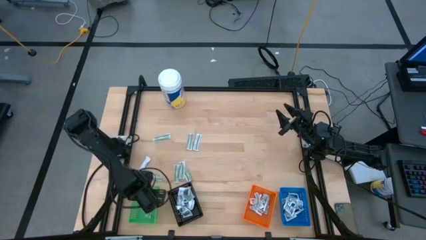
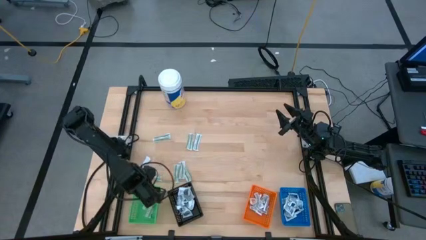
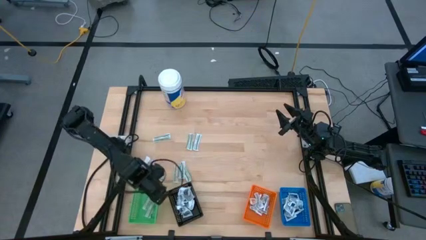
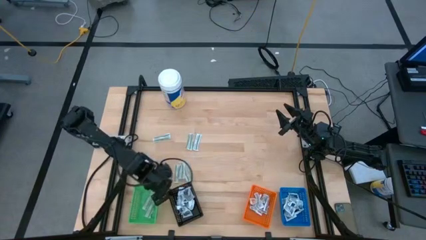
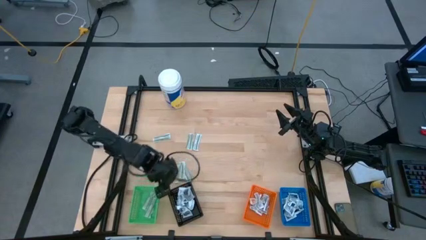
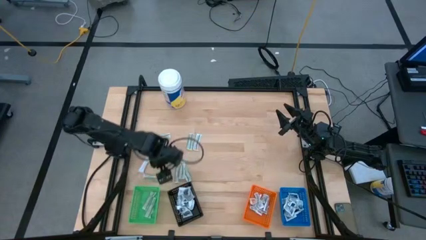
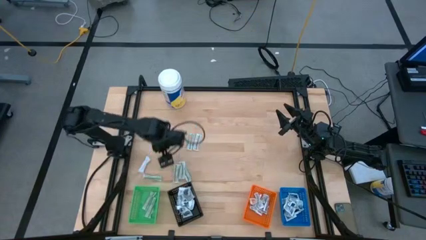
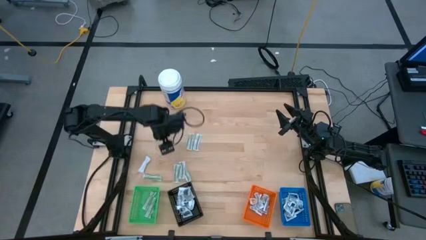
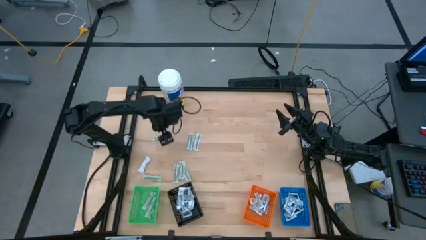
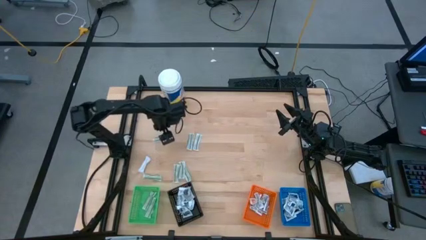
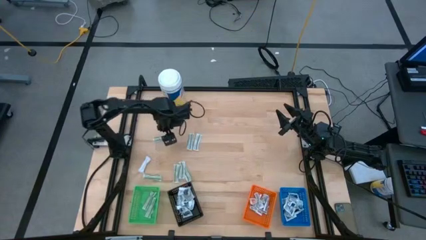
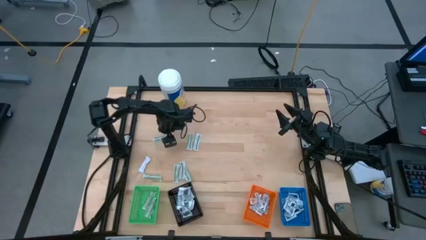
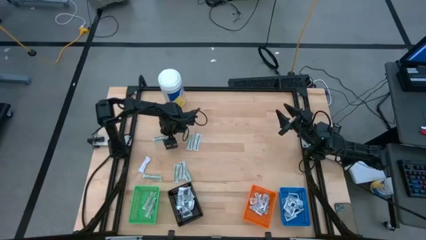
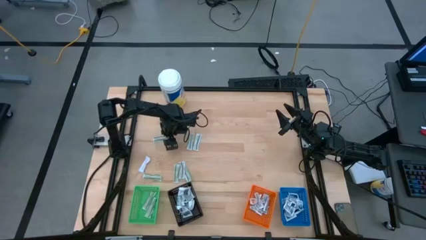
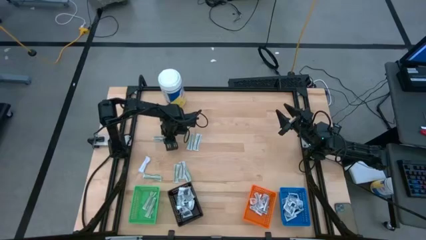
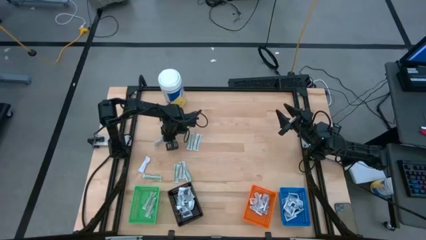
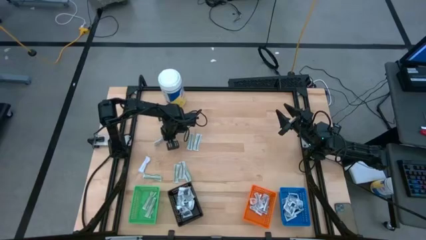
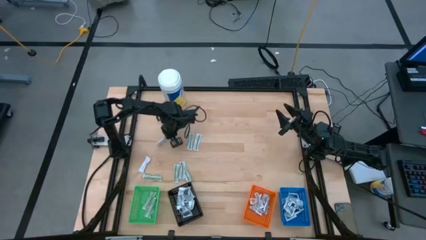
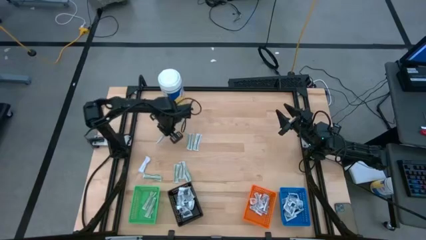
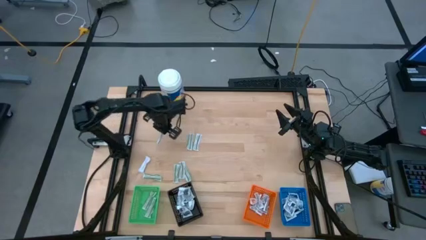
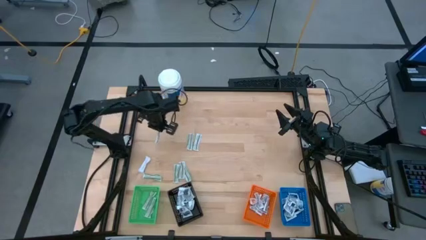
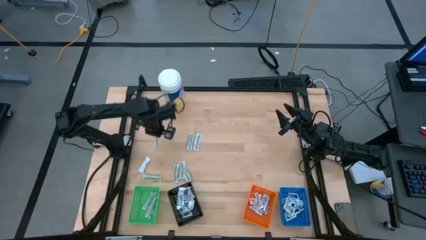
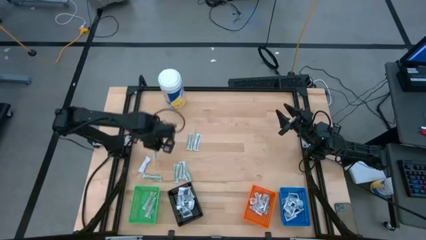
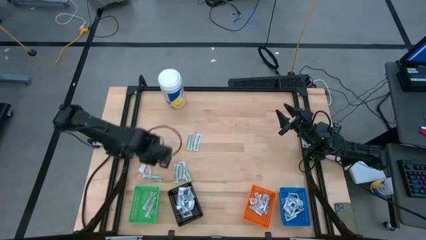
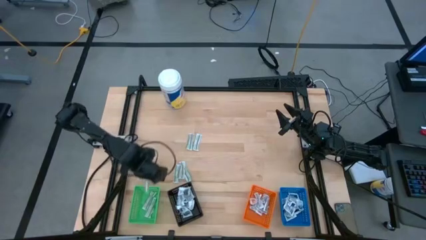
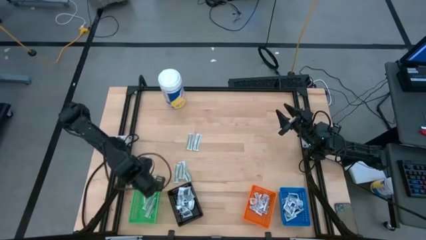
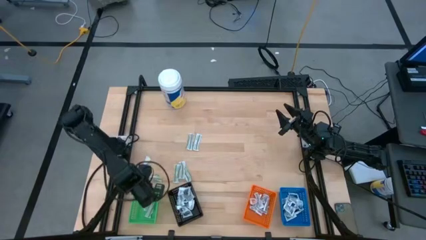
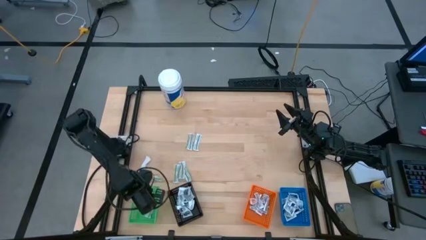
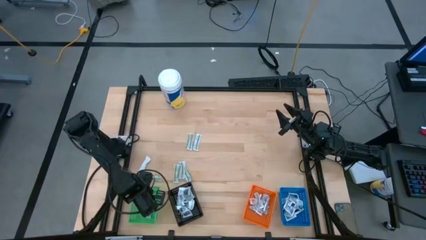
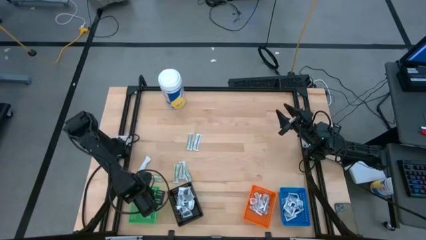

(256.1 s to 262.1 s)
Task: Pick & Place First Aid Supplies
Put the bandage into the green bin

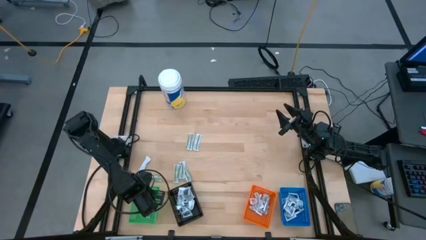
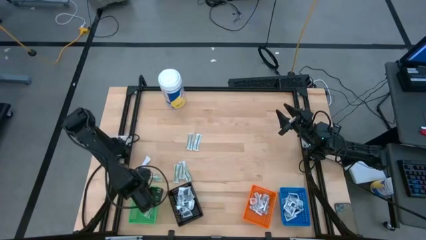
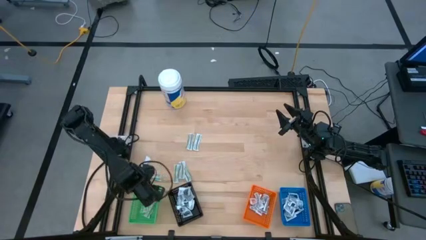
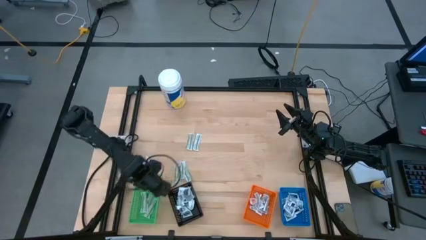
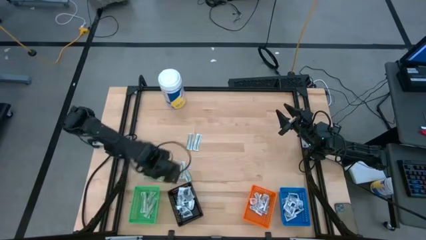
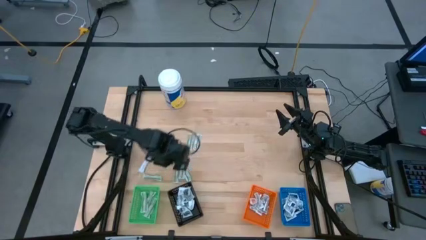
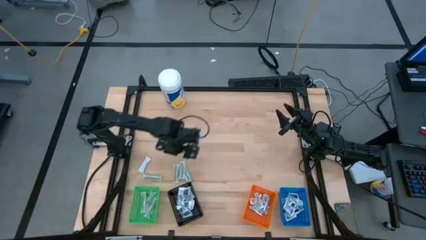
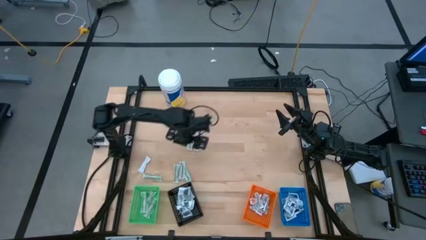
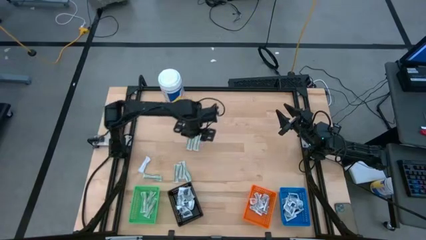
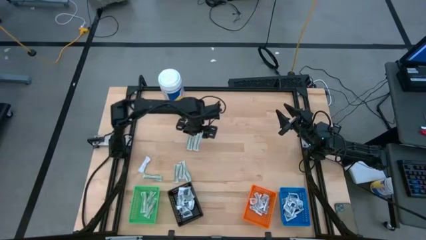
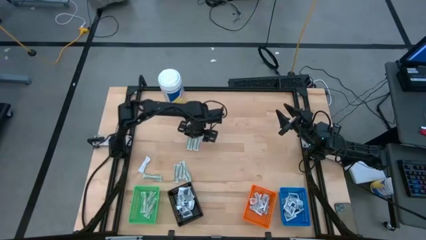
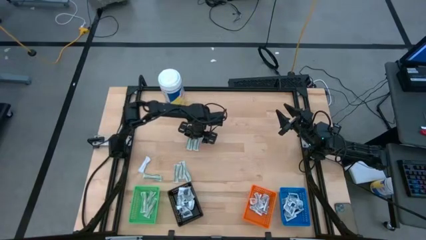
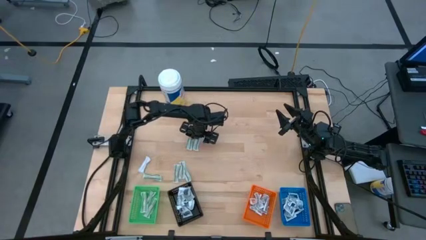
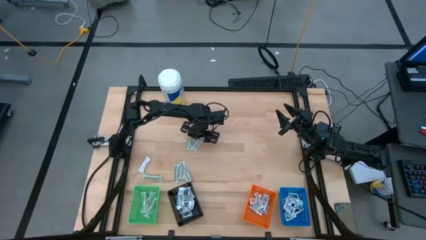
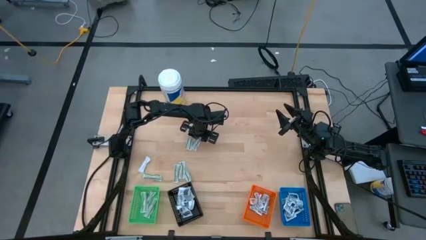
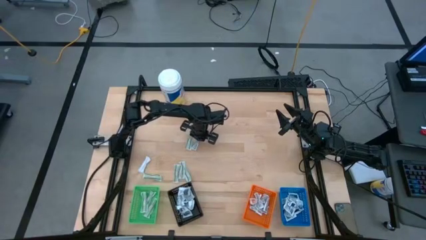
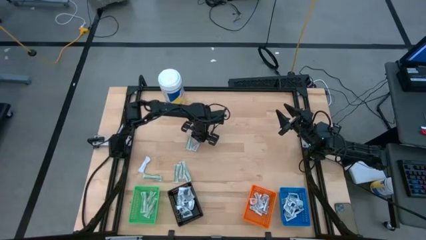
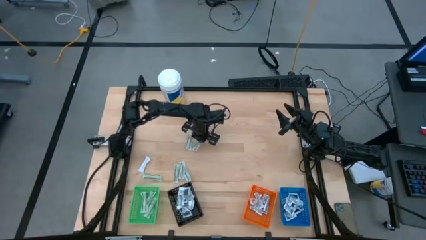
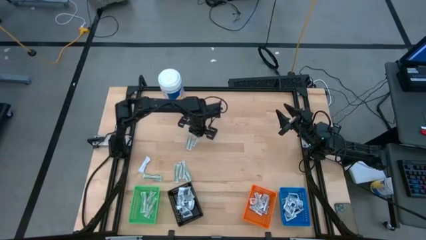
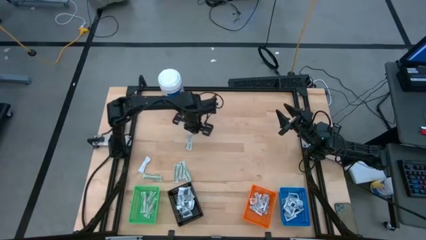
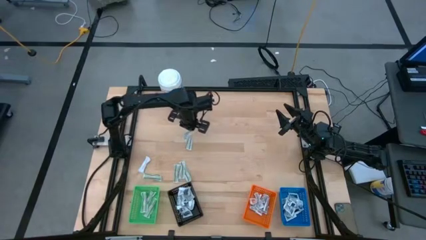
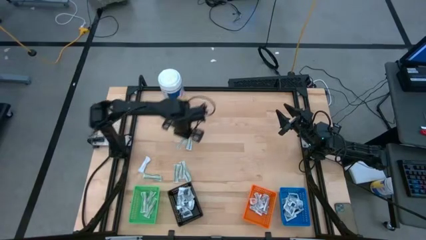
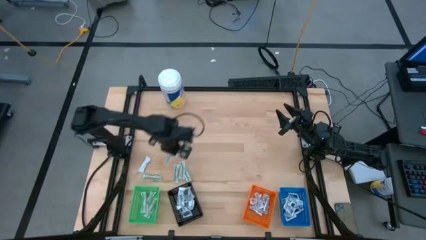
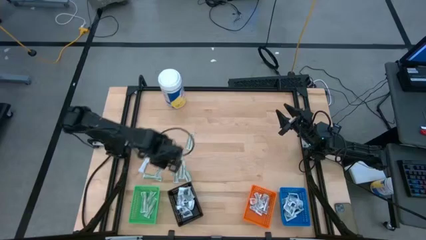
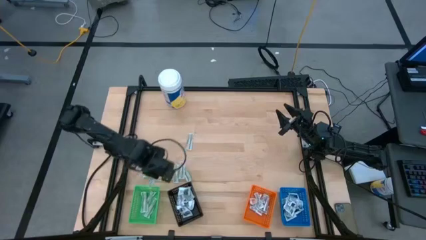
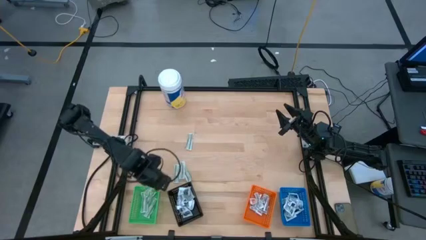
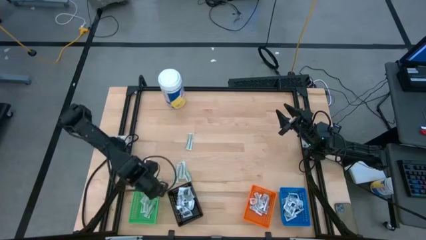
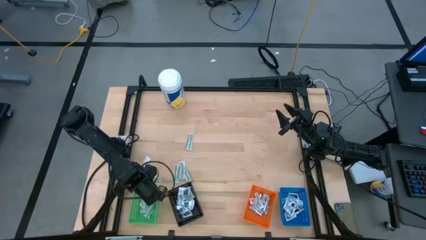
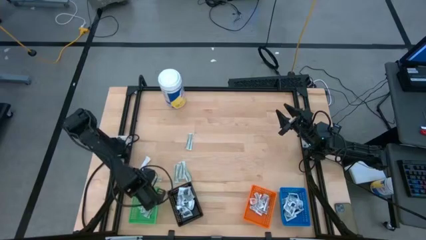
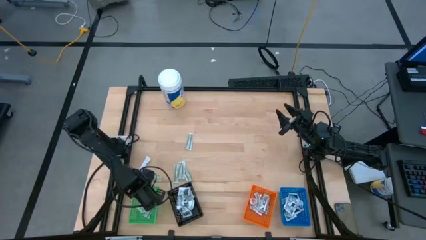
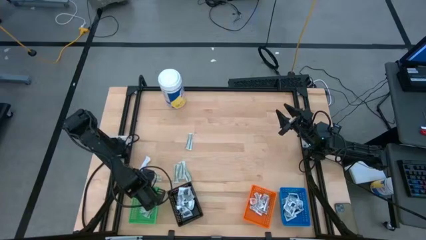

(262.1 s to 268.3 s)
Put the bandage into the green bin

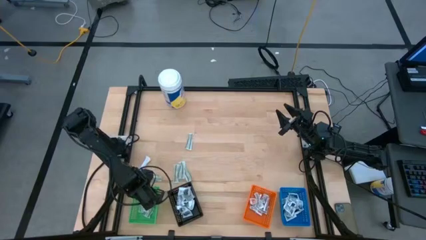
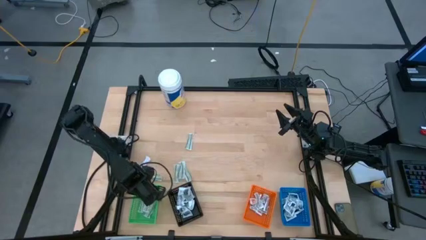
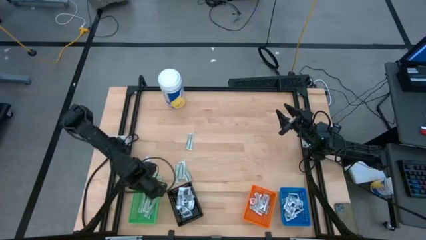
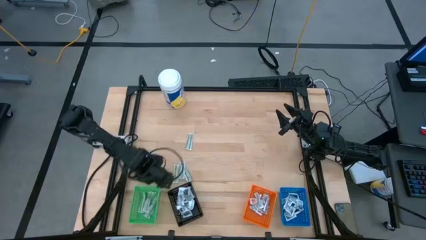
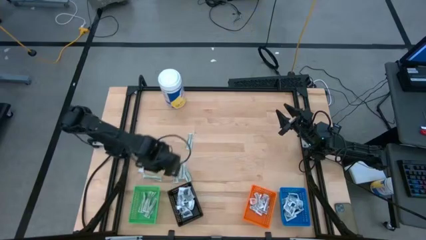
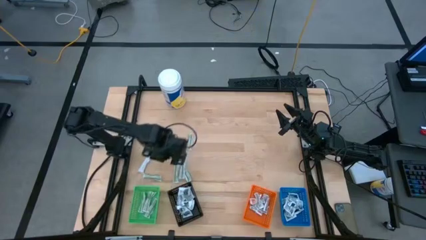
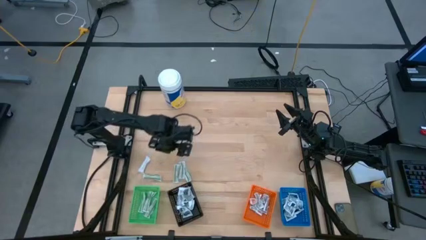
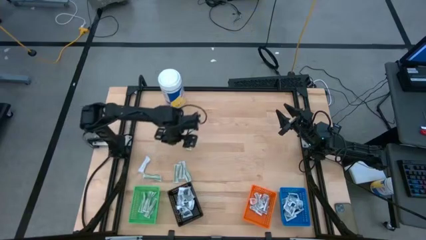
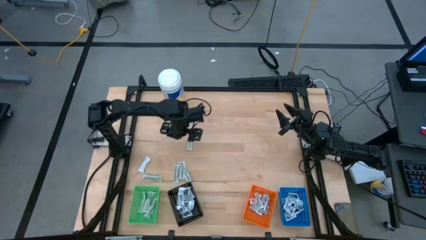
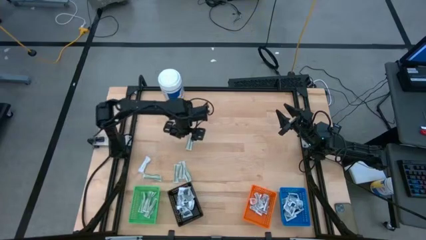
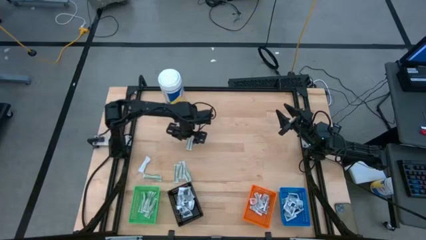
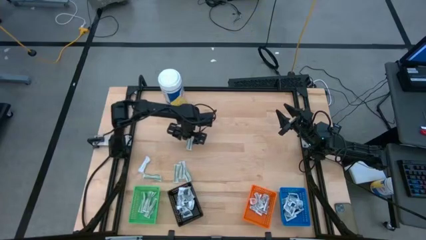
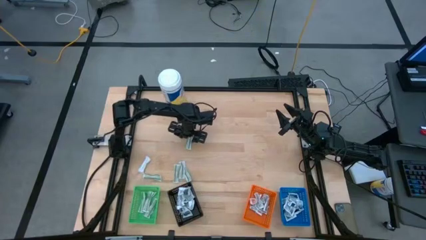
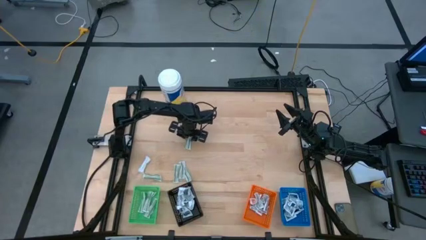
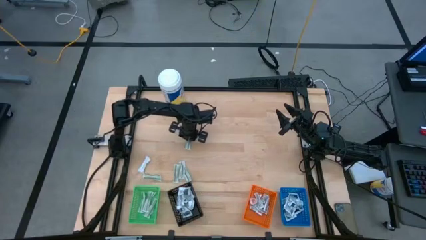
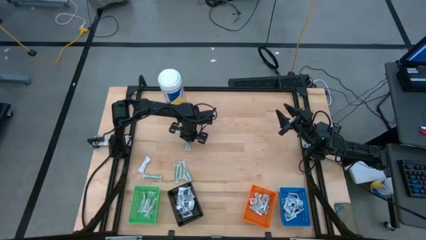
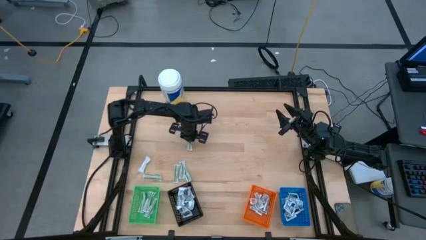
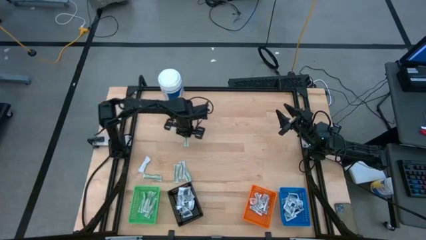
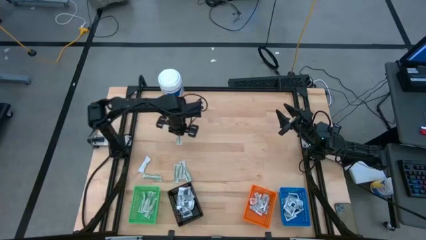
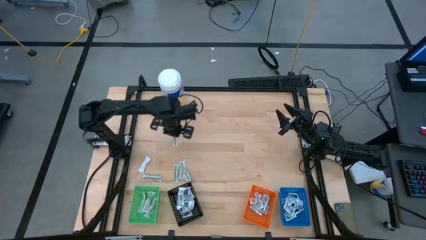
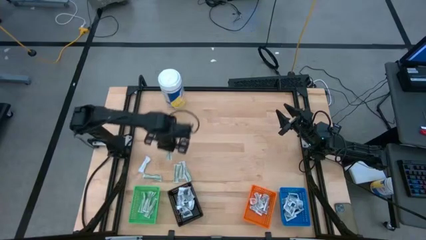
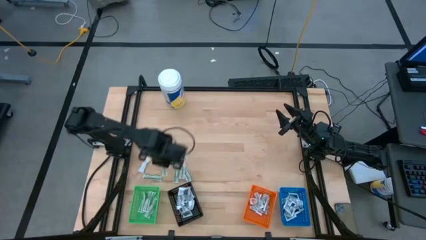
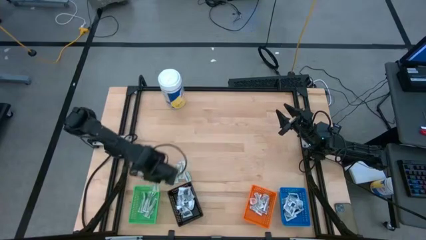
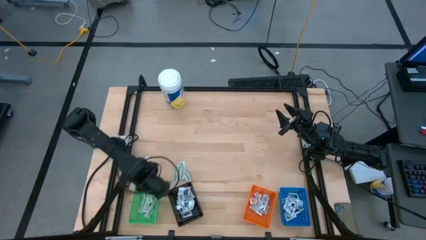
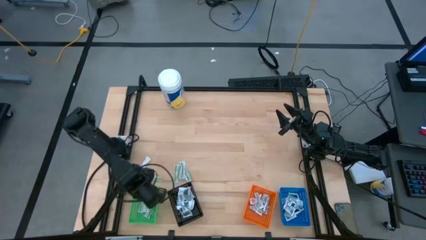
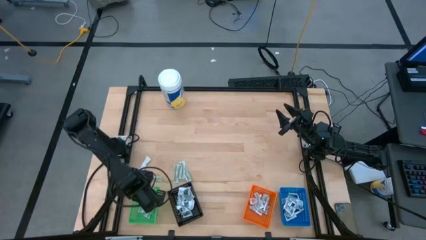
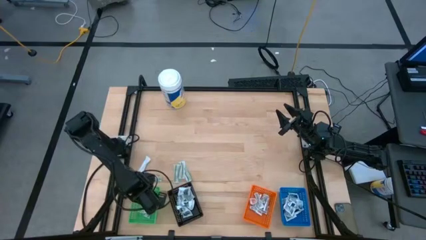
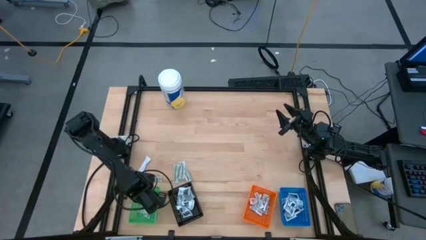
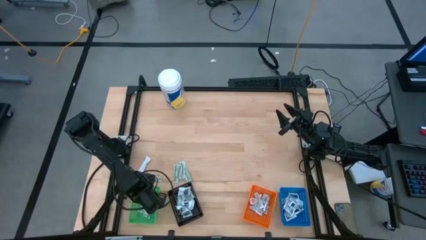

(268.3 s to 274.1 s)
Put the bandage into the green bin
